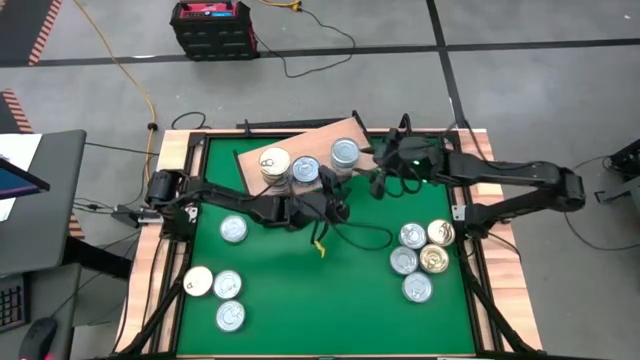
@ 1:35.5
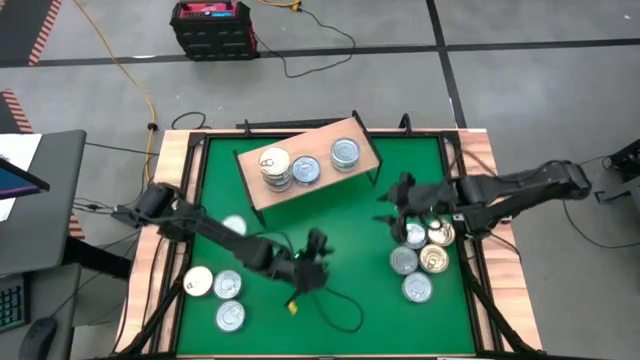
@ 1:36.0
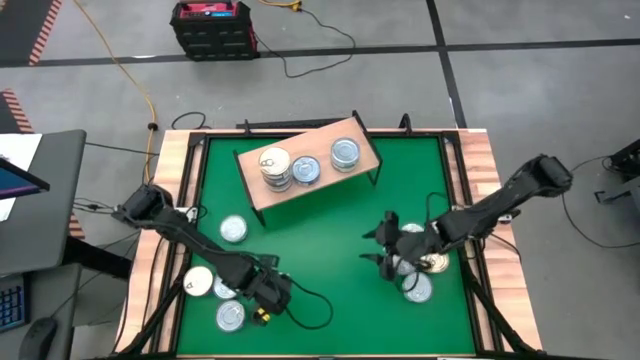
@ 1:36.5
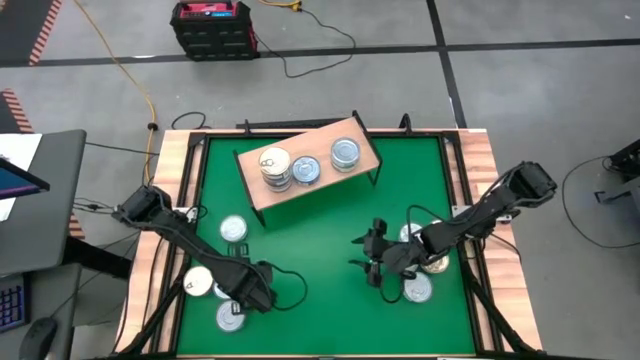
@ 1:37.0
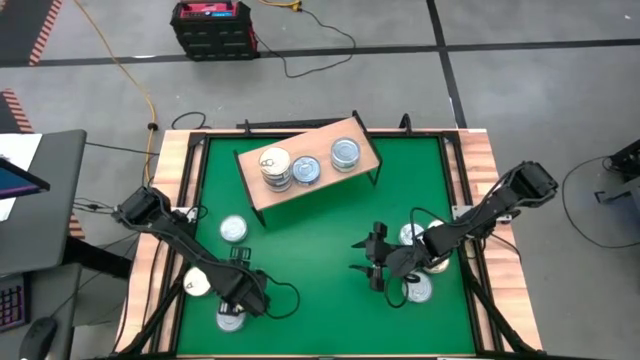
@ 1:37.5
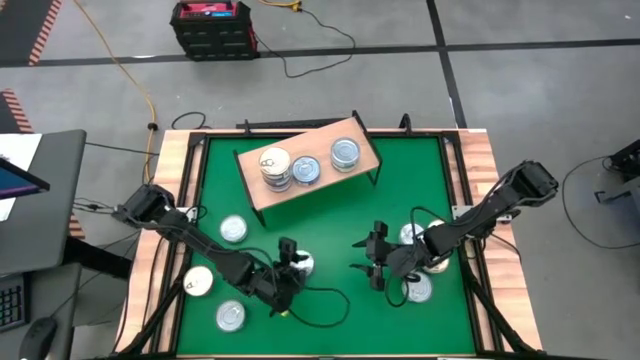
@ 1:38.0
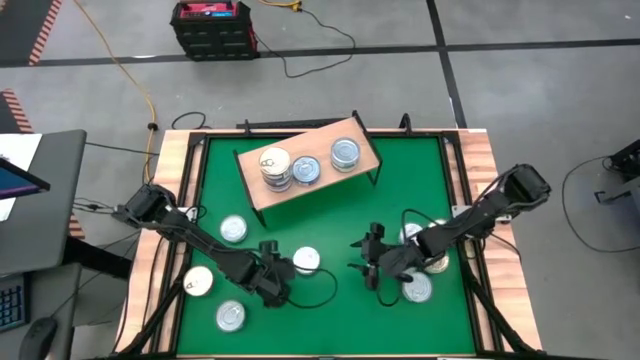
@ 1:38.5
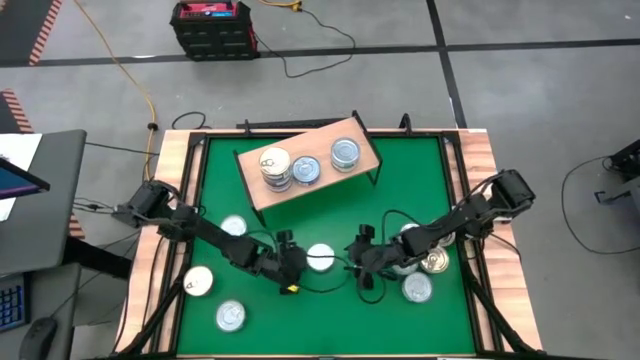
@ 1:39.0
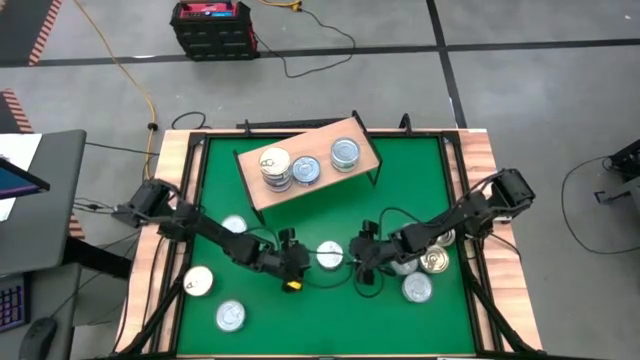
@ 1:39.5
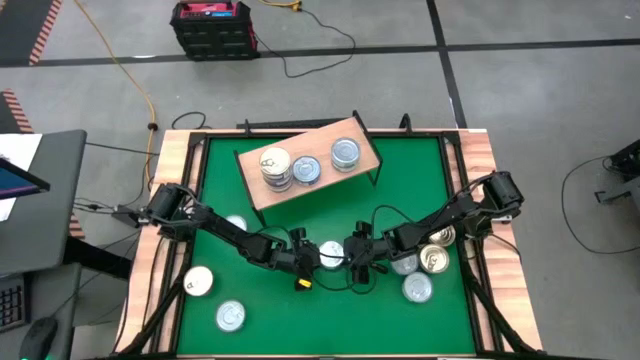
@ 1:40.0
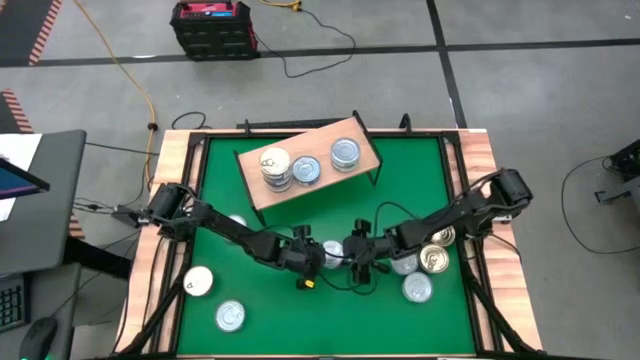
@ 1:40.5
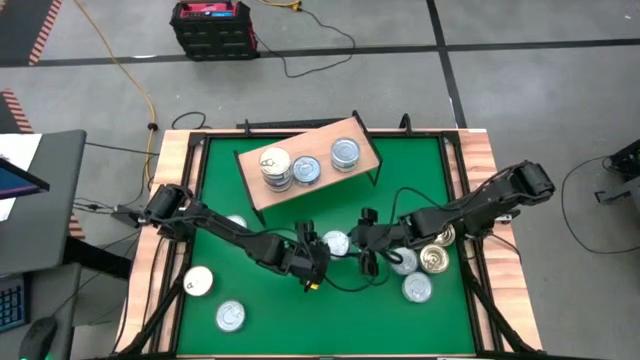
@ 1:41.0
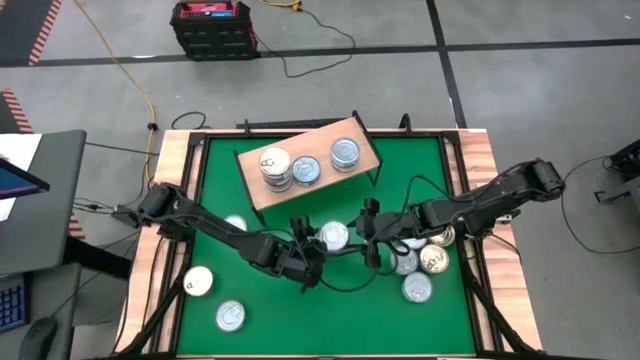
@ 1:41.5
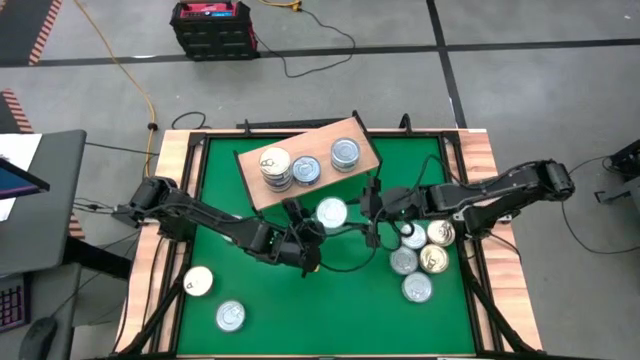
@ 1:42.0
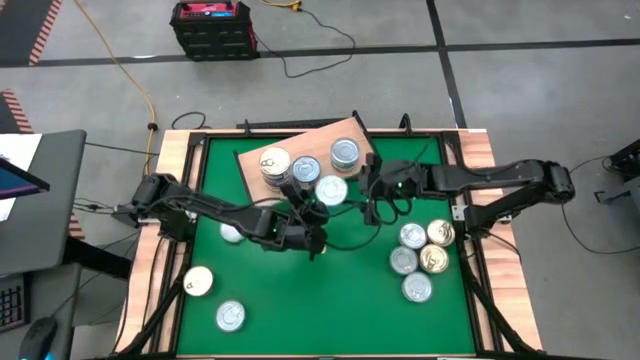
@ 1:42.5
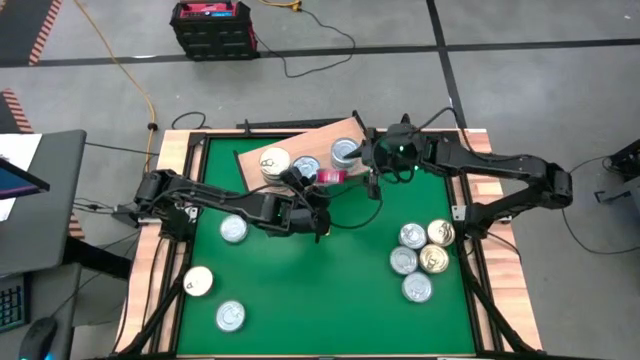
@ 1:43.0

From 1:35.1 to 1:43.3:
Task: Stack canned seafood by type on shelf
Stack the red tuna can on top of the blue tuna can on the shelf

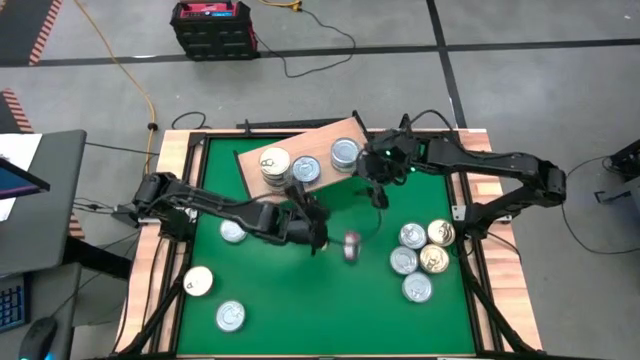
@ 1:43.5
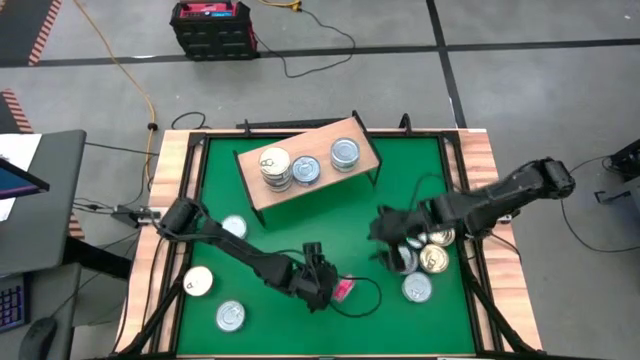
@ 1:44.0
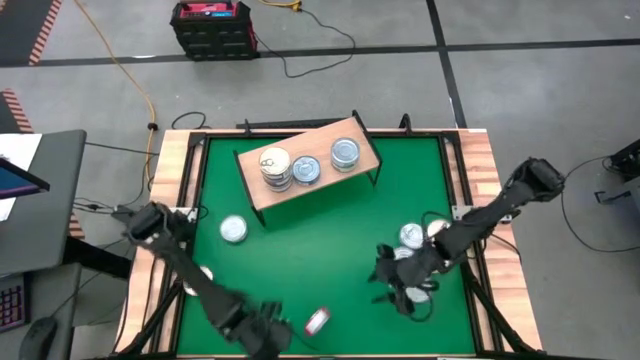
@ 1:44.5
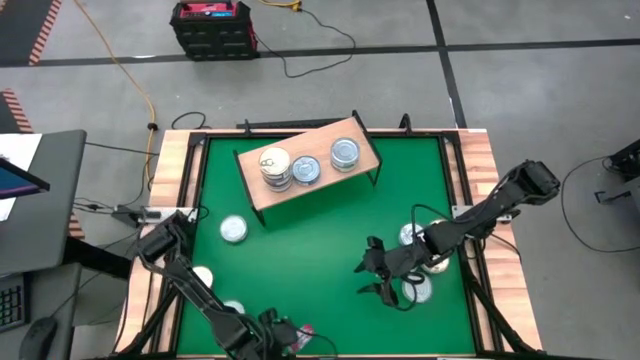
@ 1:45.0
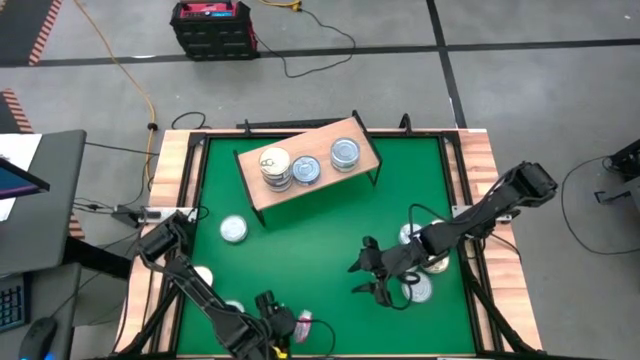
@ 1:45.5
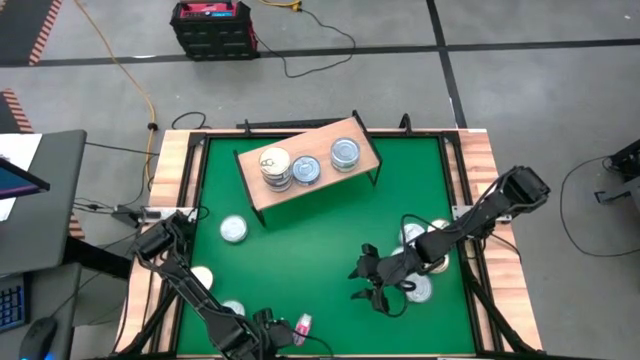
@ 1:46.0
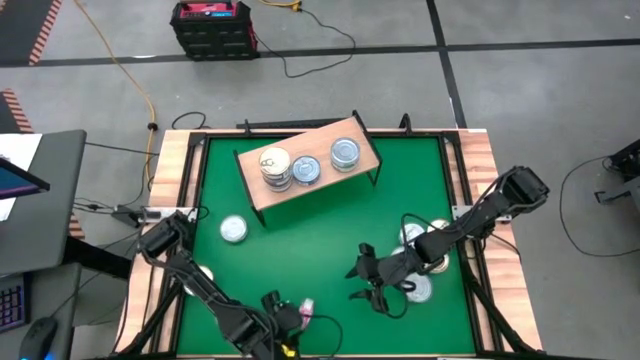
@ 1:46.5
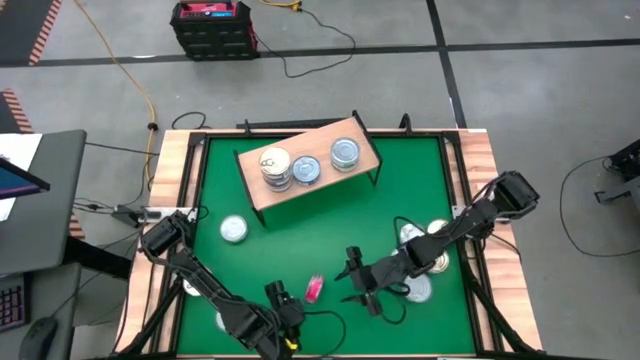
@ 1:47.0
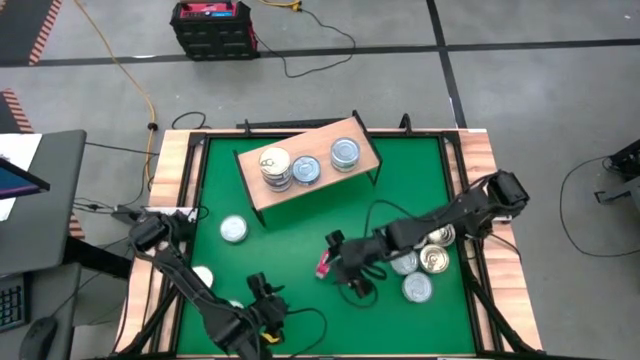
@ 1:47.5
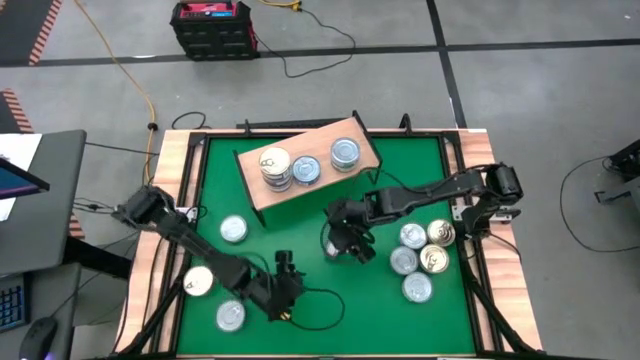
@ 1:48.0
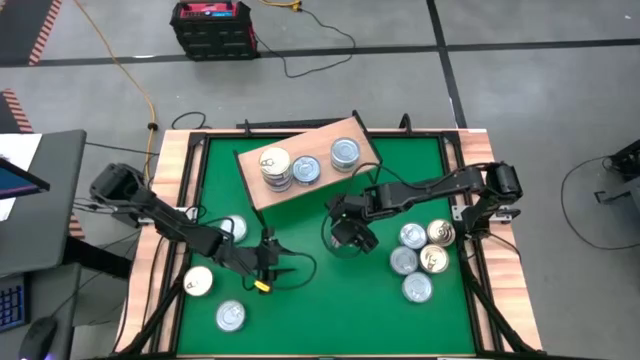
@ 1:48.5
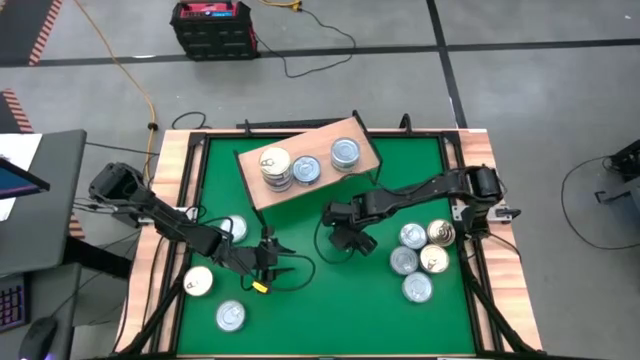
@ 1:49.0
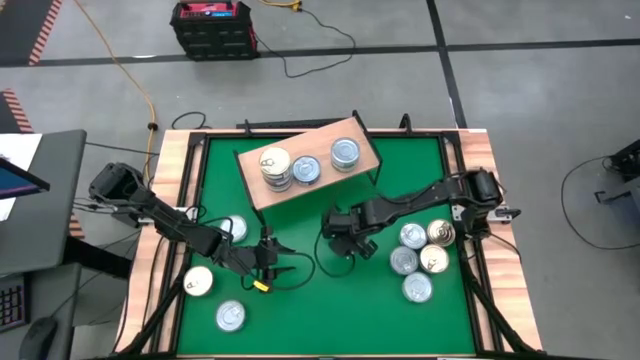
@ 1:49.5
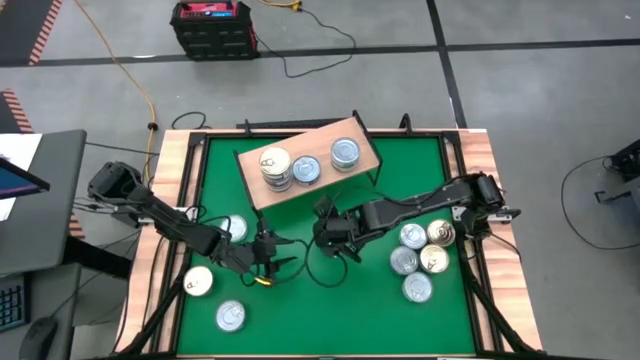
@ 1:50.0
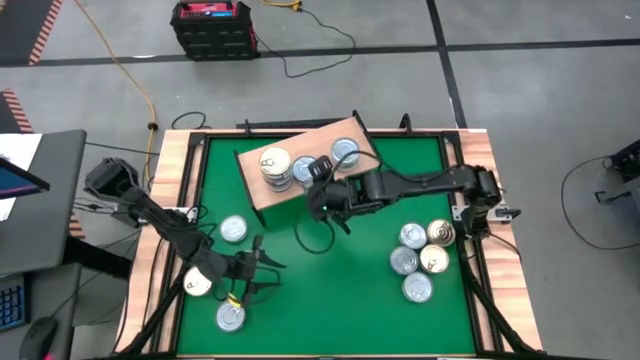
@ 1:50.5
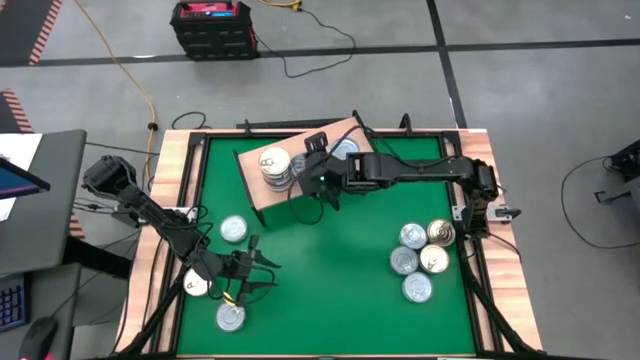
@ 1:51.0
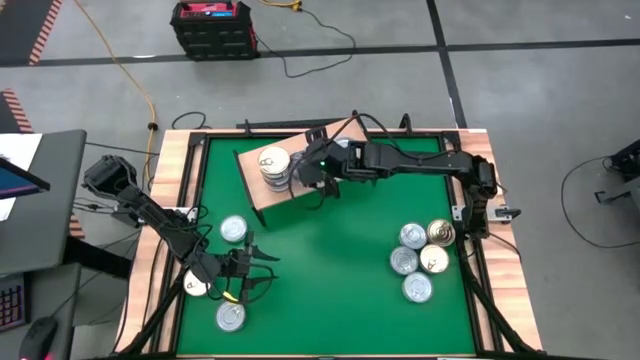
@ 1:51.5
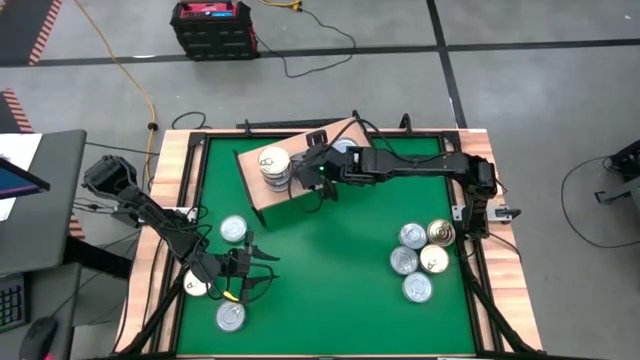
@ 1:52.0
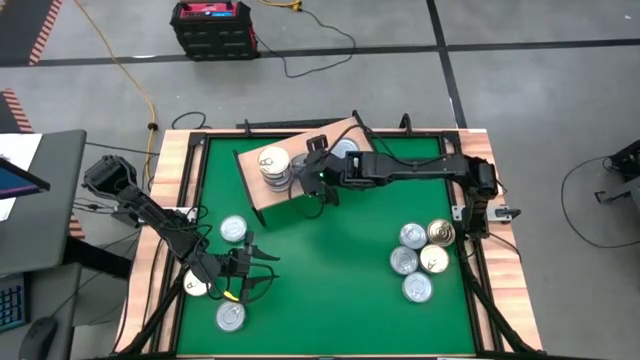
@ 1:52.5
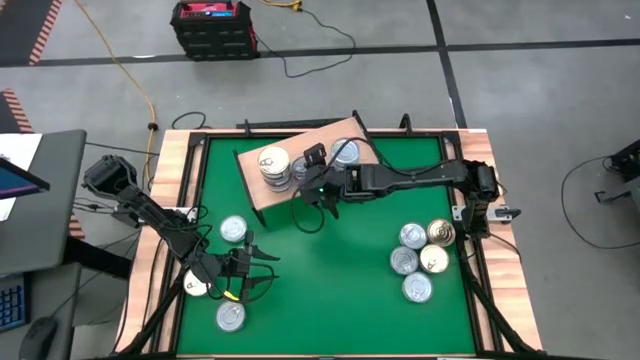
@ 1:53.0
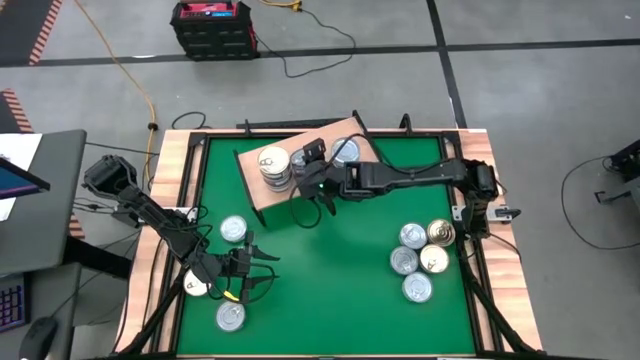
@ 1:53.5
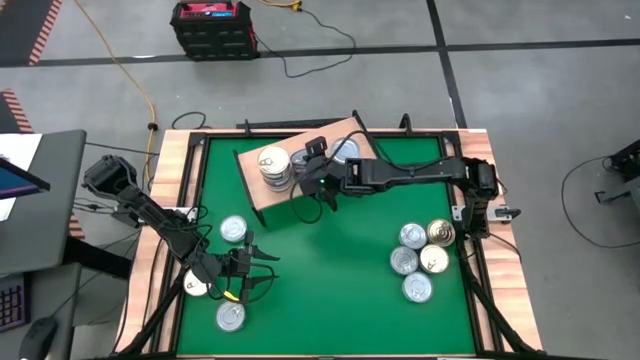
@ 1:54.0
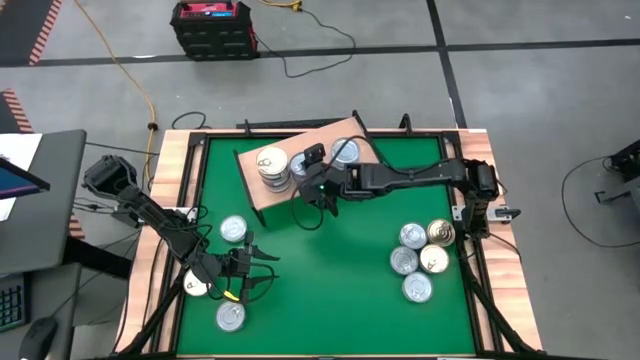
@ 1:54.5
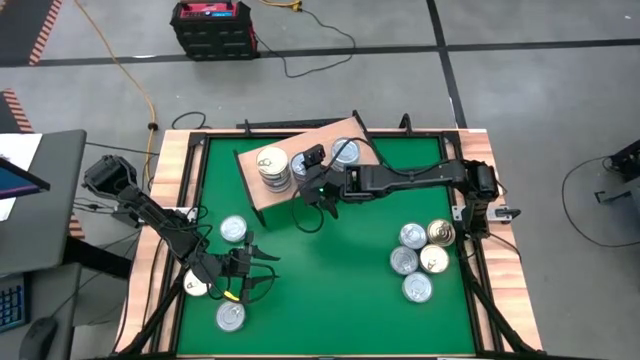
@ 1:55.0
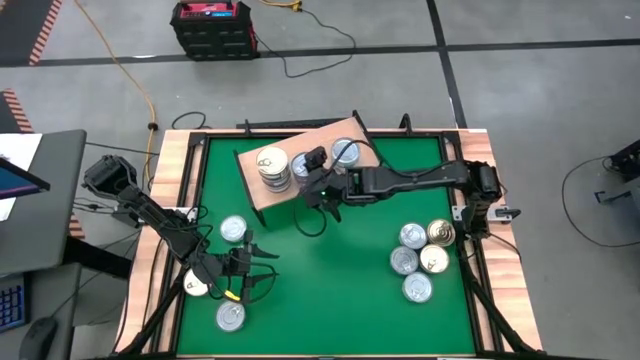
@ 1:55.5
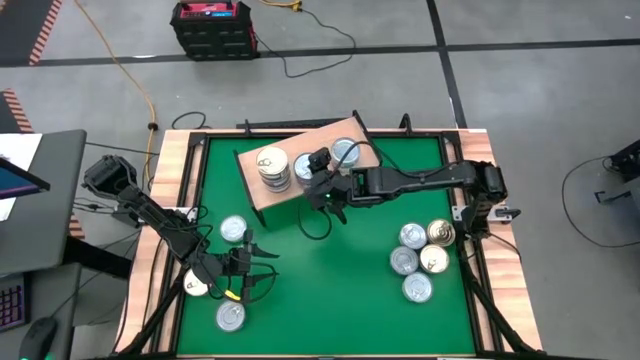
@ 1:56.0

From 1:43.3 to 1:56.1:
Stack the red tuna can on top of the blue tuna can on the shelf
